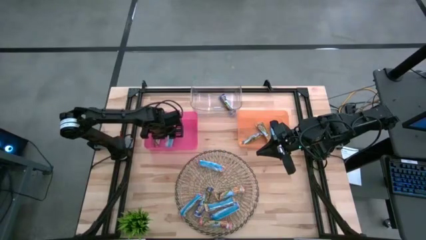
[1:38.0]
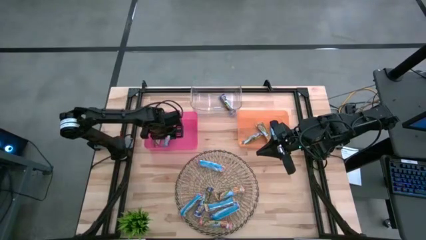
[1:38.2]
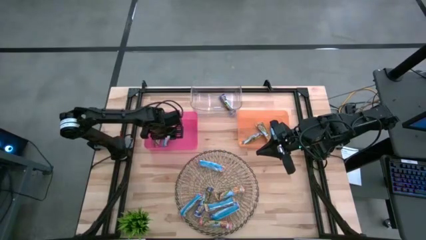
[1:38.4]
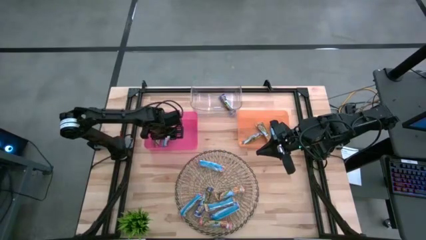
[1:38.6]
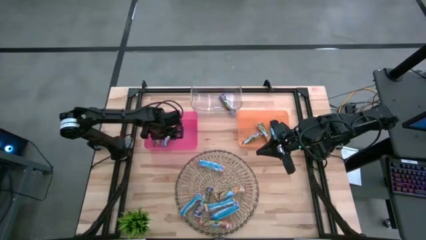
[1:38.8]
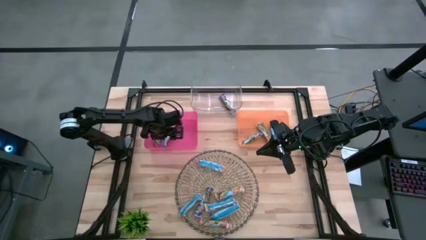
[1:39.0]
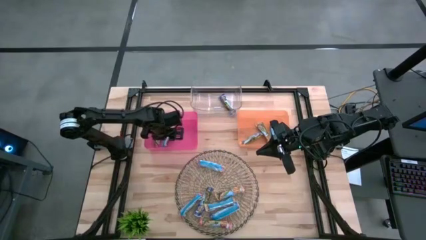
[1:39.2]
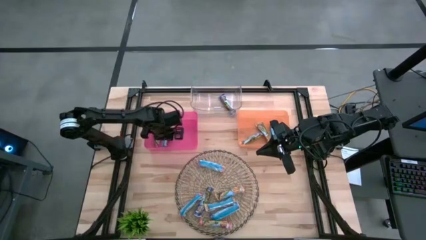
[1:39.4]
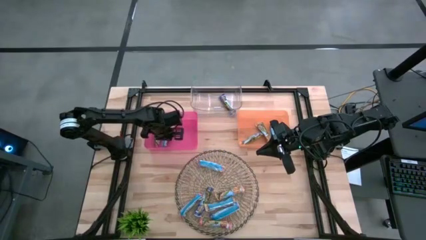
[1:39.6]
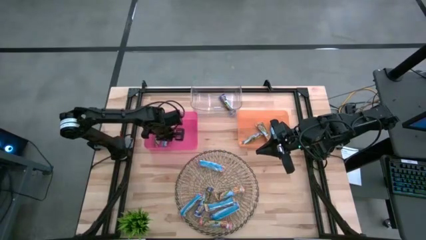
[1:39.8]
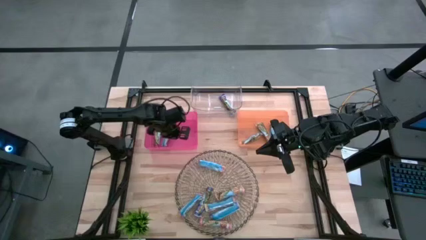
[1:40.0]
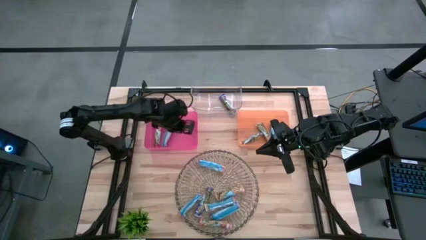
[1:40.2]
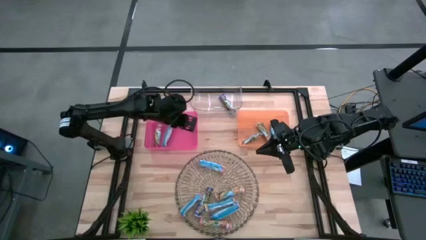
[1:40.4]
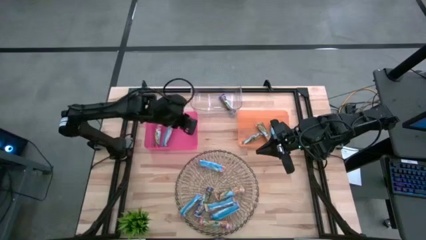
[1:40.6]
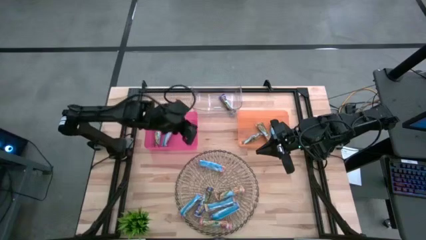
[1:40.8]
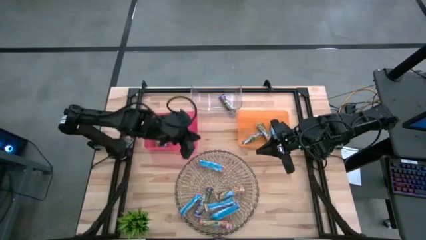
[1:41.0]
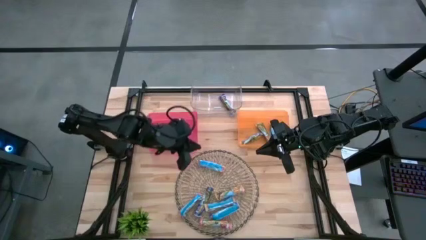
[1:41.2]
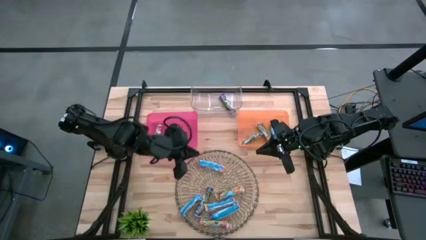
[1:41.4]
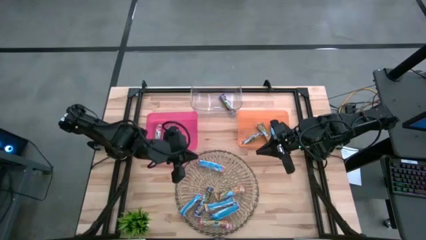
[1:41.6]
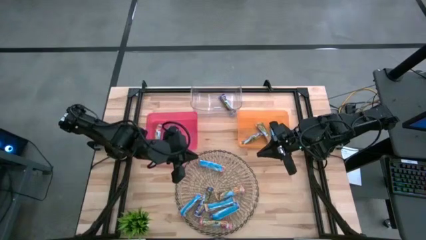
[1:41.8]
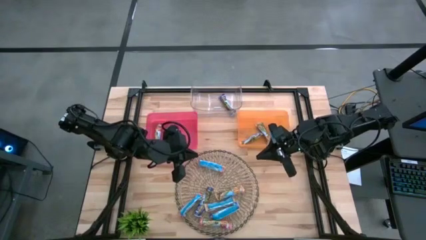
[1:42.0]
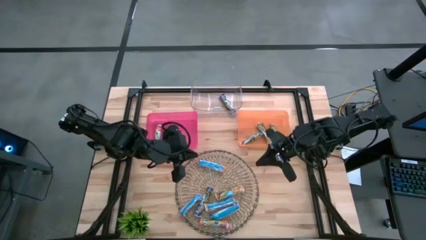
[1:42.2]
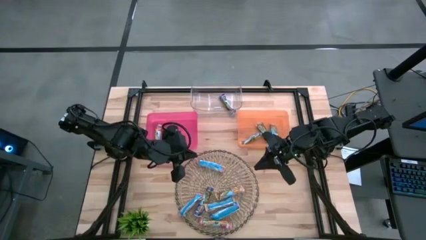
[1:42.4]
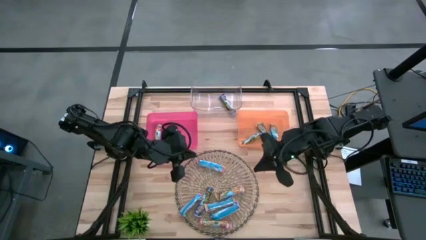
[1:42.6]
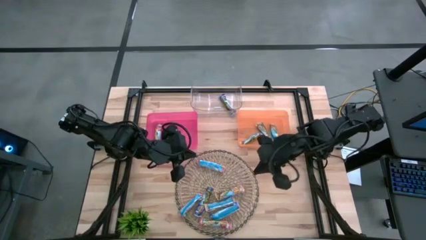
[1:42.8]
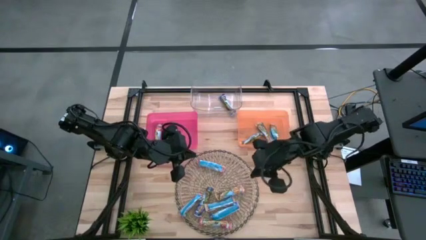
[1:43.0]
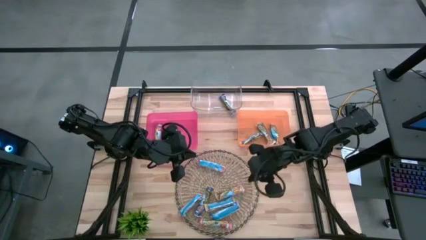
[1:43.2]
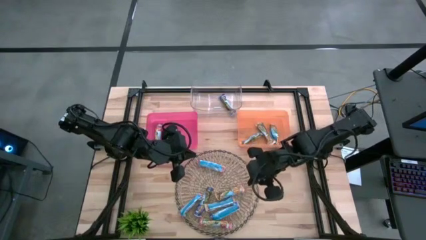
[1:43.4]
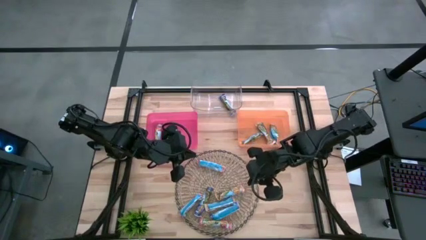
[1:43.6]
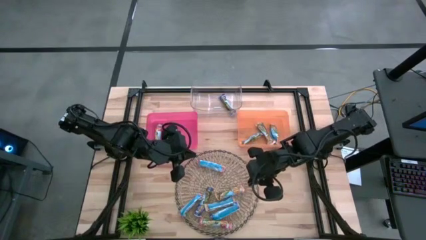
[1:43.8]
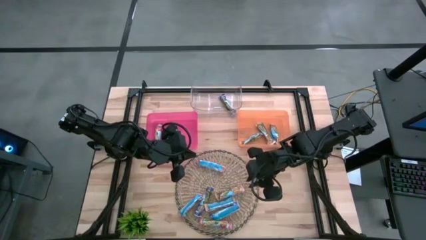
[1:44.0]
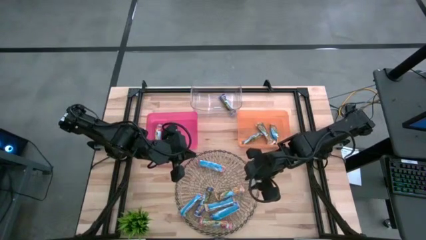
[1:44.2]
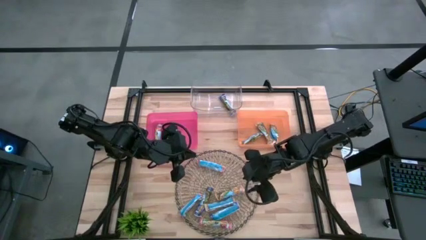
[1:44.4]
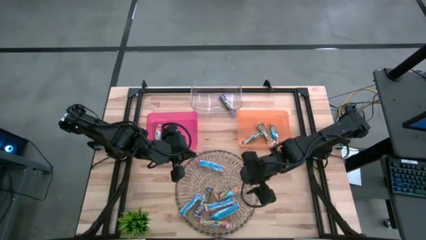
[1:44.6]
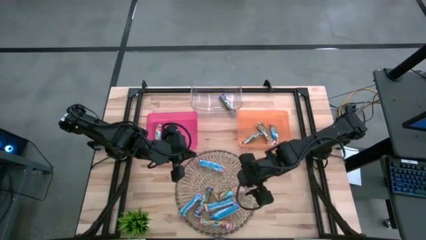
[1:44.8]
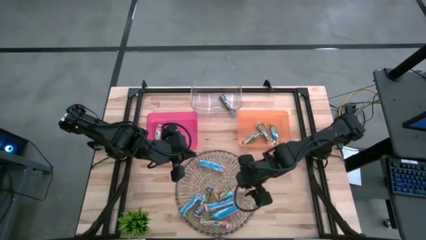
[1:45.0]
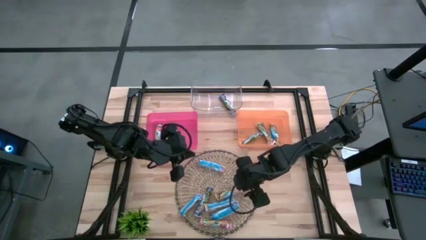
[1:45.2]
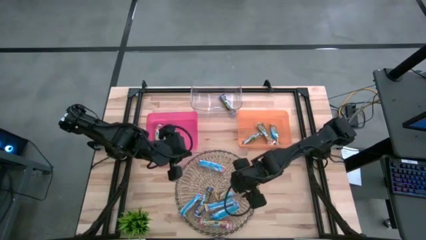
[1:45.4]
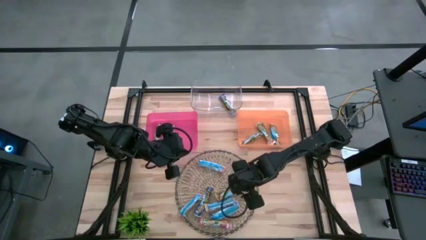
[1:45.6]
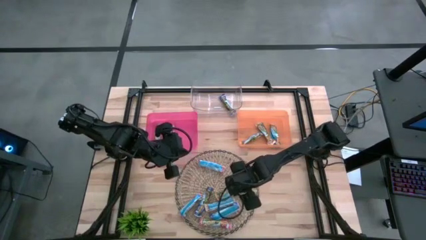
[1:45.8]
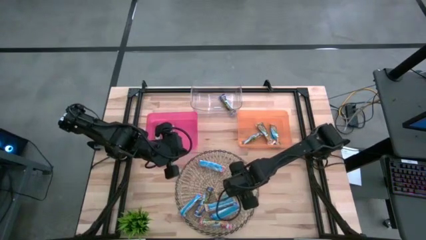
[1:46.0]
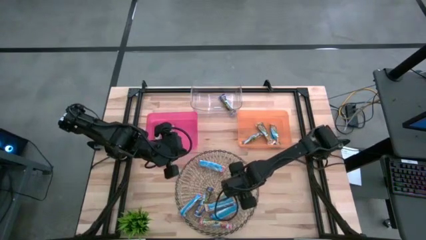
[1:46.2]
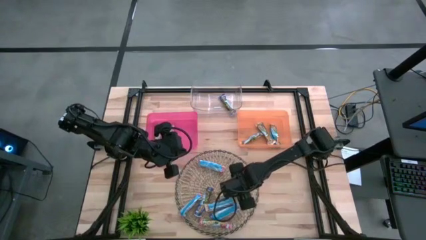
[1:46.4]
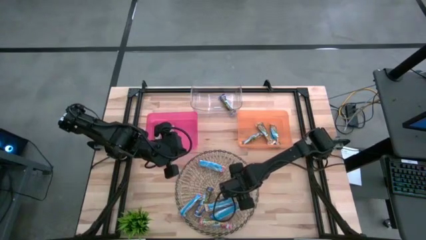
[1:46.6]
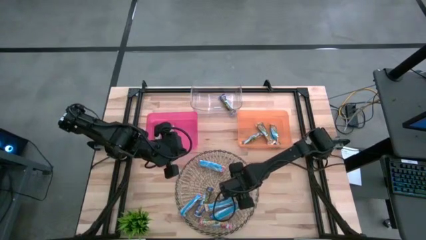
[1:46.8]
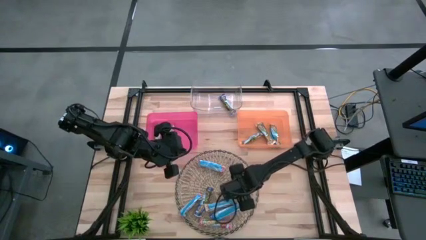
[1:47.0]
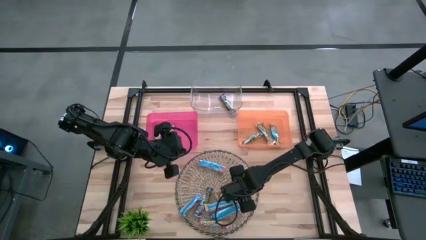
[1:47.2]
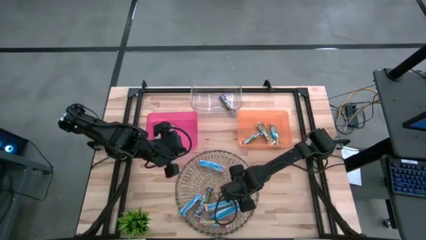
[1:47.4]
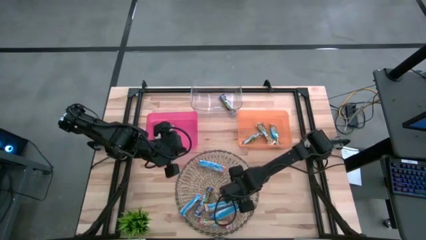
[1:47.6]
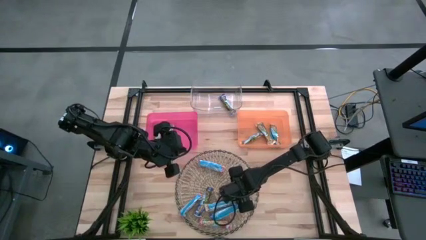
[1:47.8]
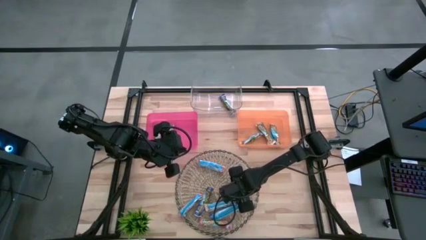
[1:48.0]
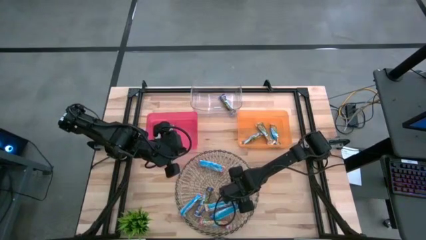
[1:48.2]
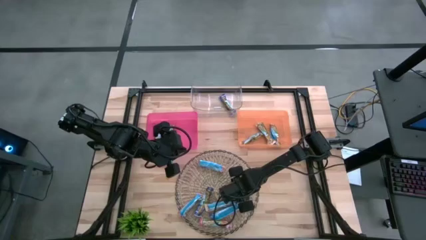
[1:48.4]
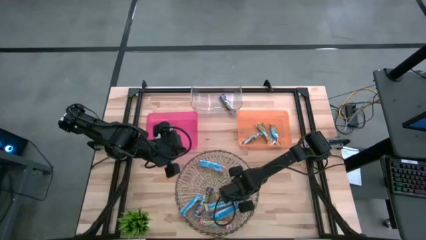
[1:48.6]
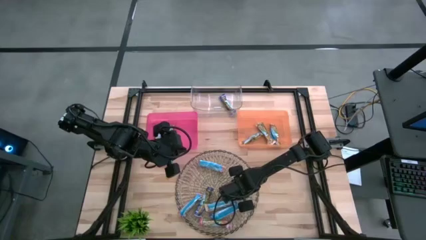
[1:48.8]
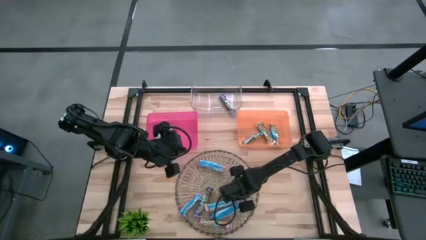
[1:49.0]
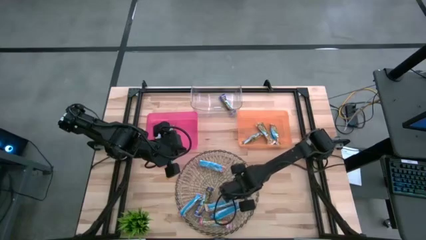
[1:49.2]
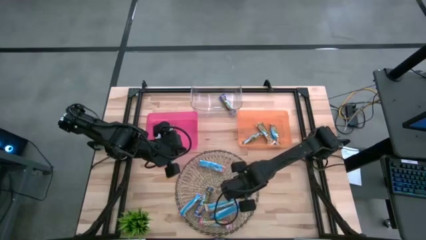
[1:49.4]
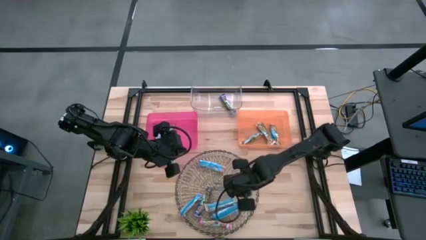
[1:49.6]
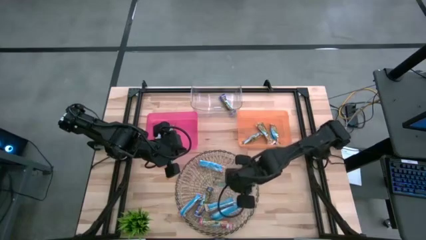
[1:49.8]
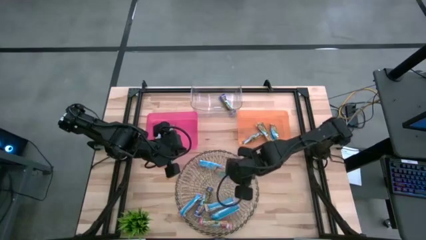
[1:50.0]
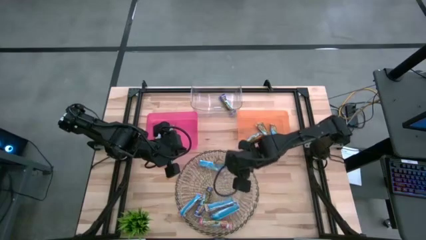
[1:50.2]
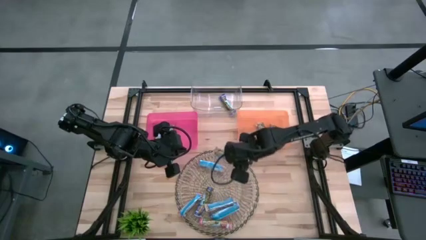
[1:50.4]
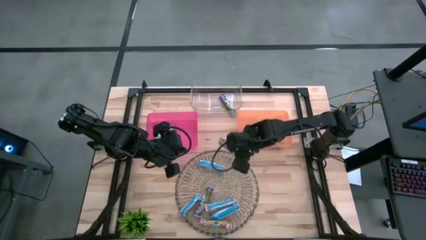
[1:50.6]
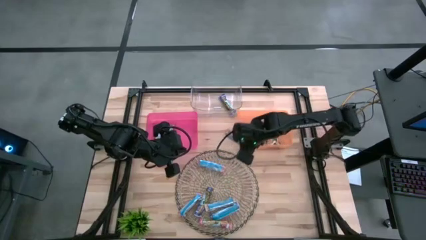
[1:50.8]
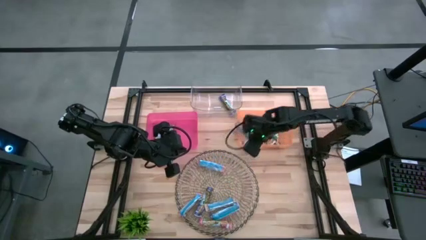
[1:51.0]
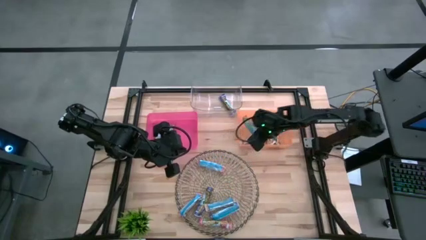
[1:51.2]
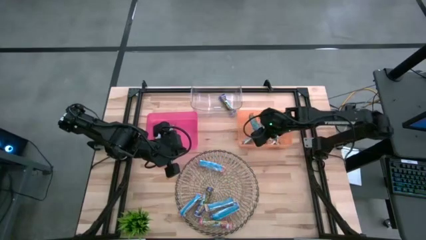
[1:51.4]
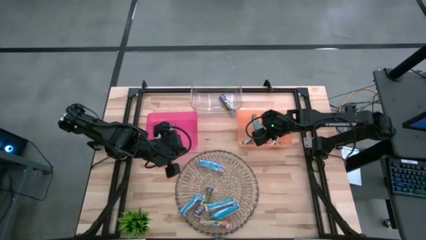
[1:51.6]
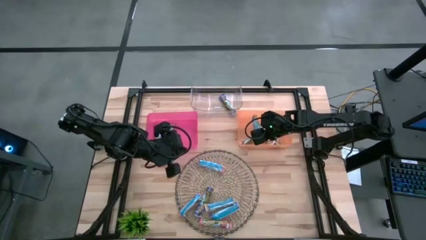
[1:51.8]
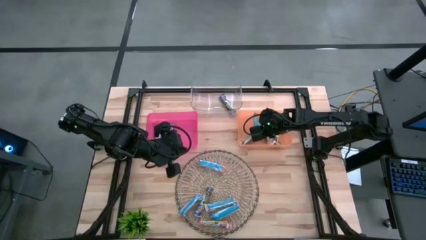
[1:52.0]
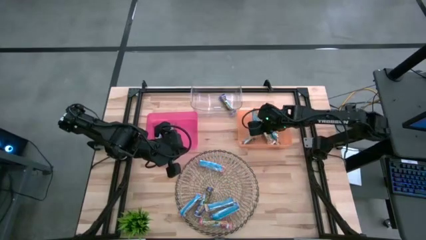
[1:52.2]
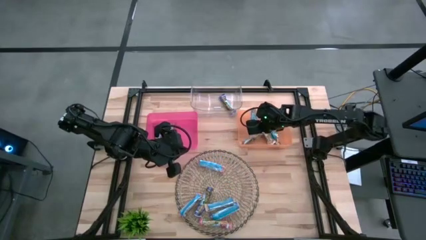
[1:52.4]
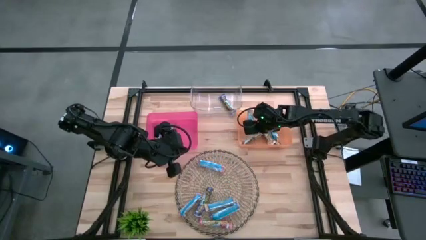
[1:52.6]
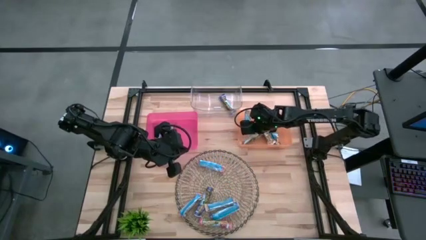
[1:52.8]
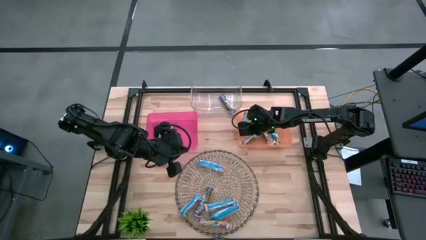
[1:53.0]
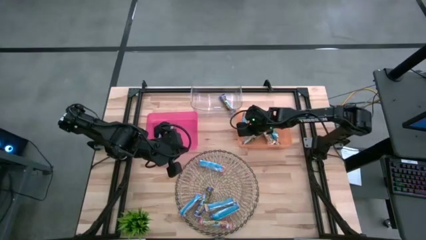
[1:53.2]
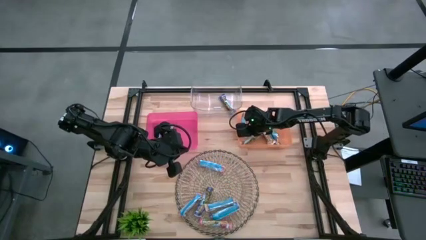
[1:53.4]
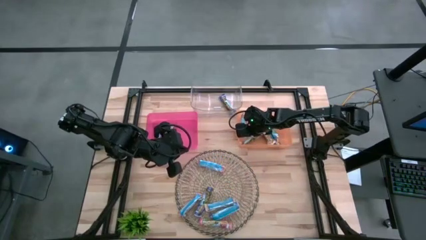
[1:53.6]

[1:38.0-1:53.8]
Task: Pick and place Granola Bars by type
Put the yellow granola bar into the yellow bin
